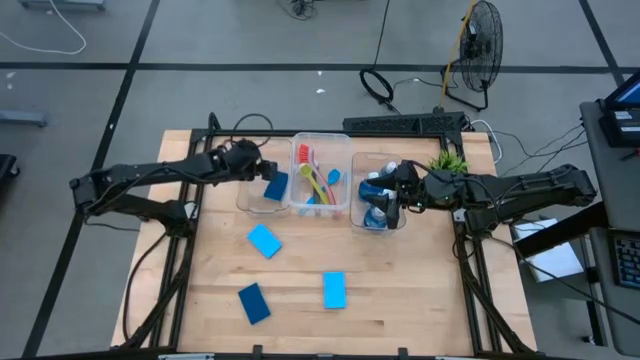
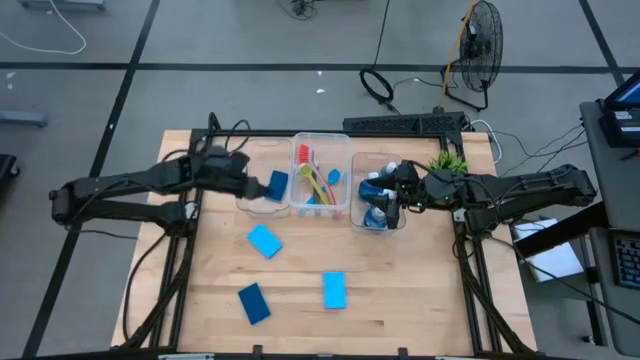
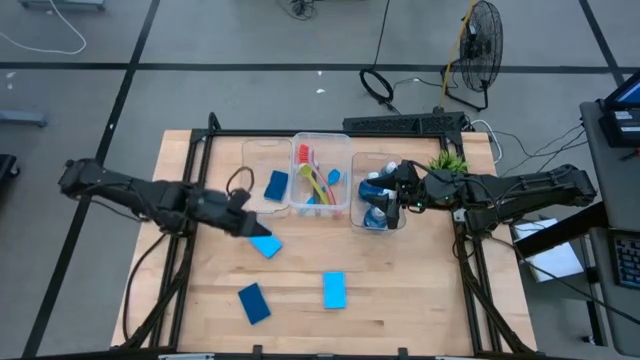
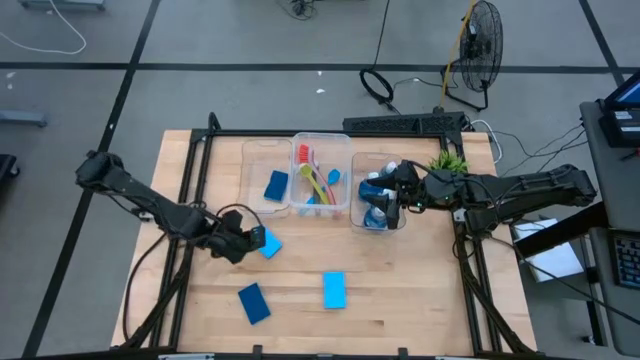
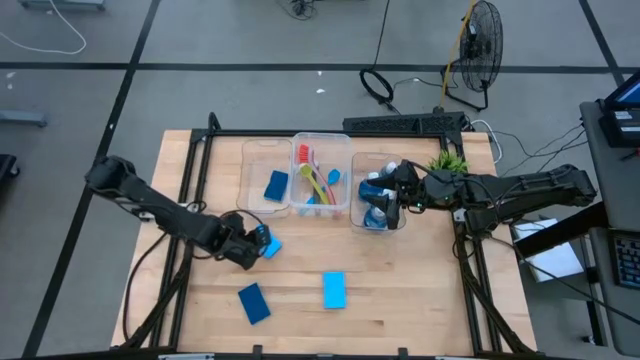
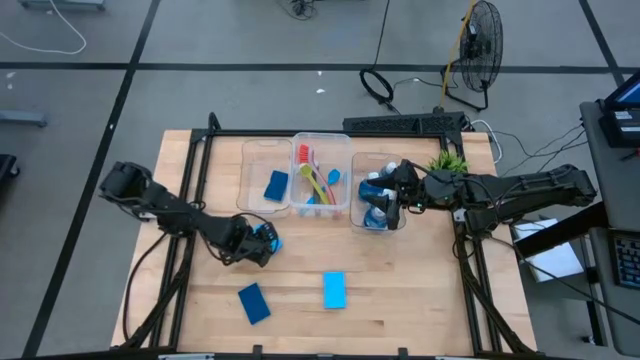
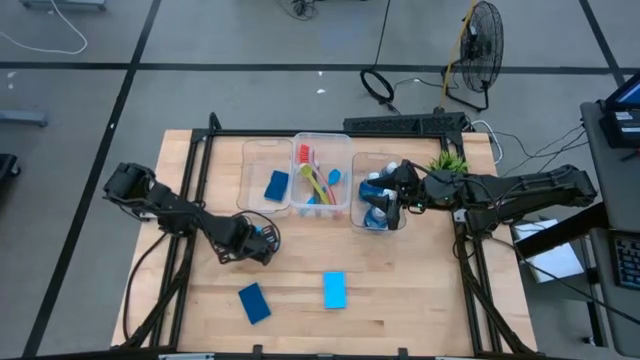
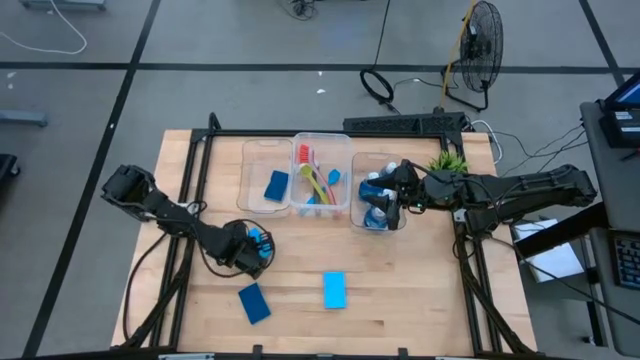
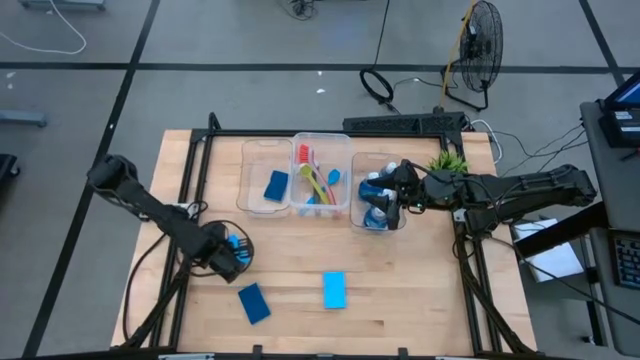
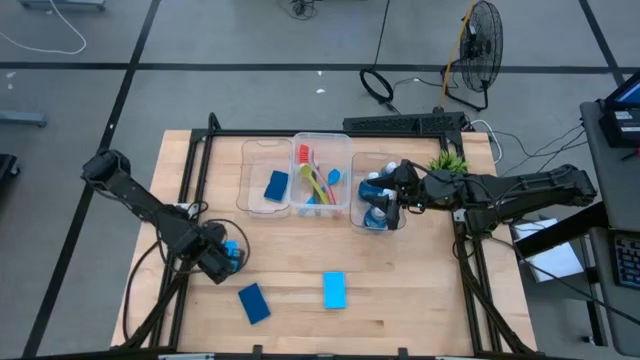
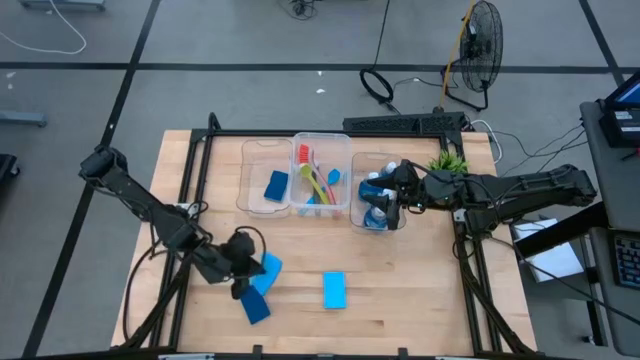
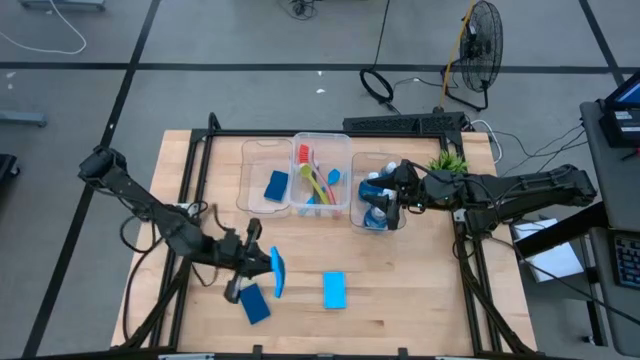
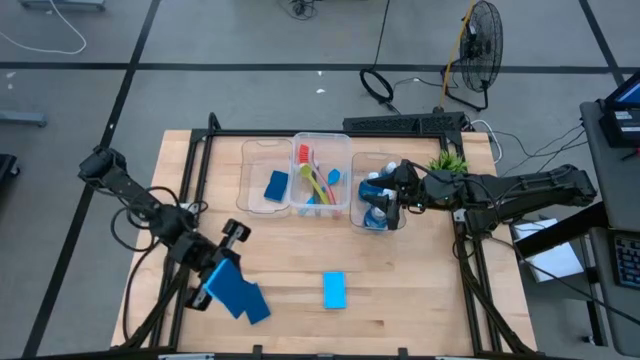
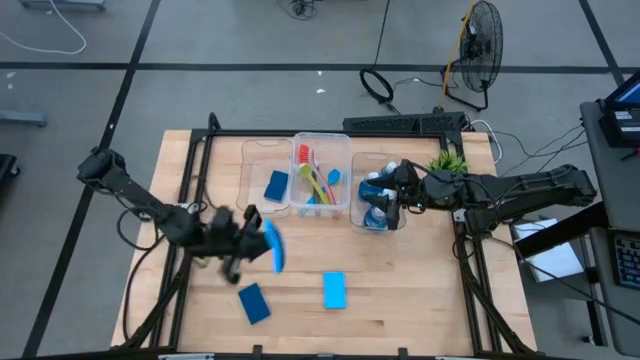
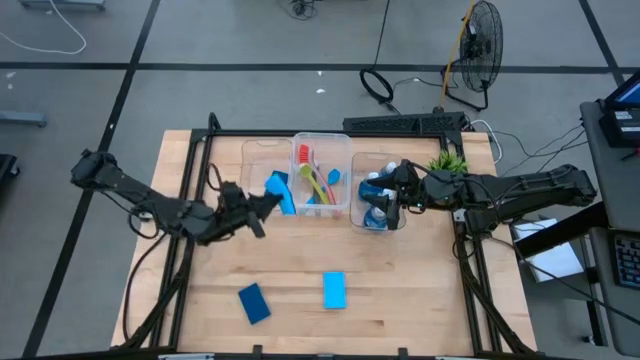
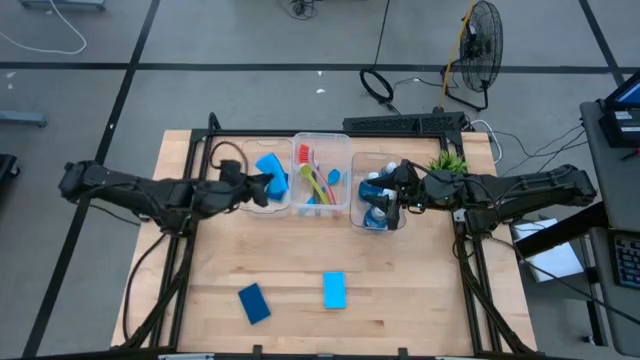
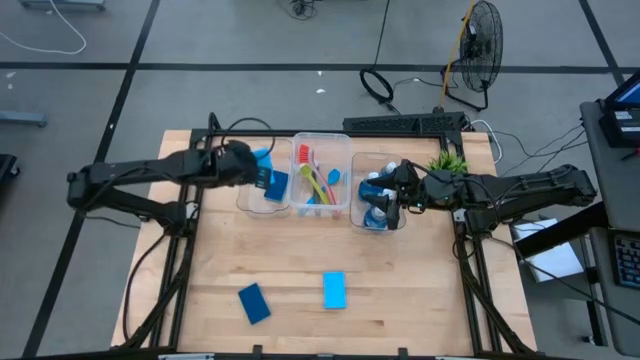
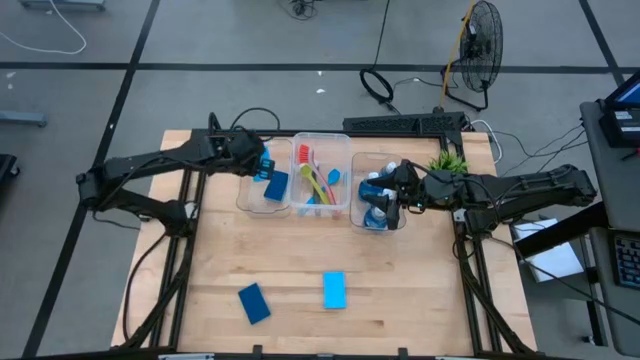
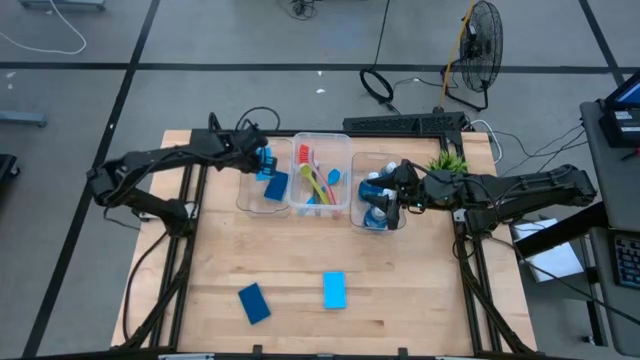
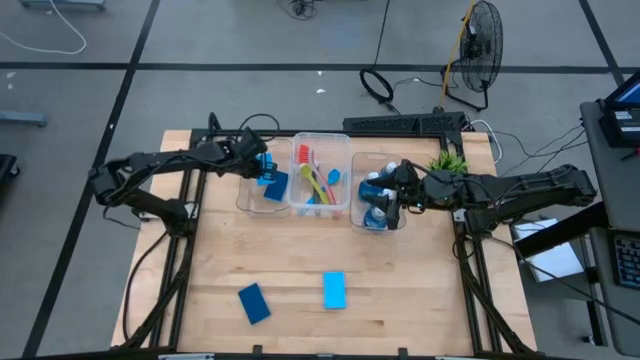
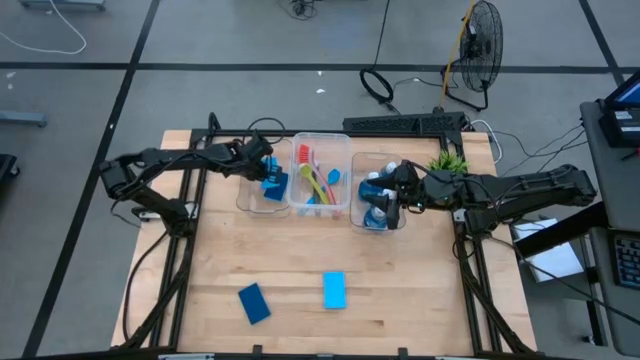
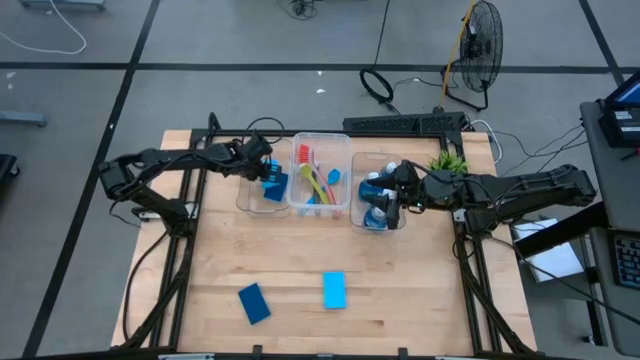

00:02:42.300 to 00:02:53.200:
Task: Pick & Place Kitchen Sink Supplies
Put the light blue sponge into the left transparent bin

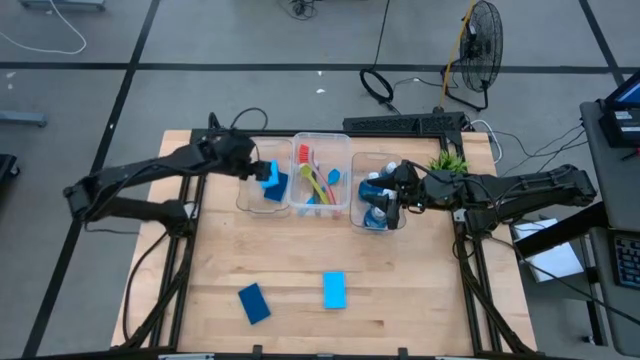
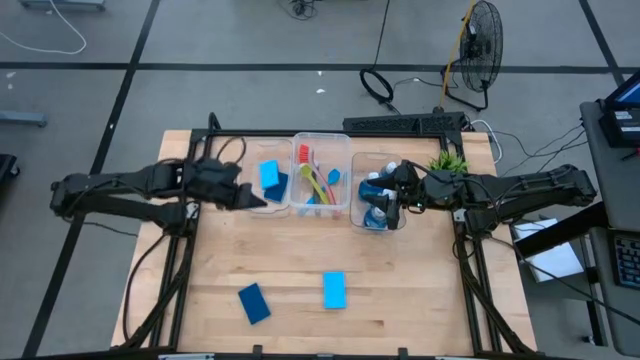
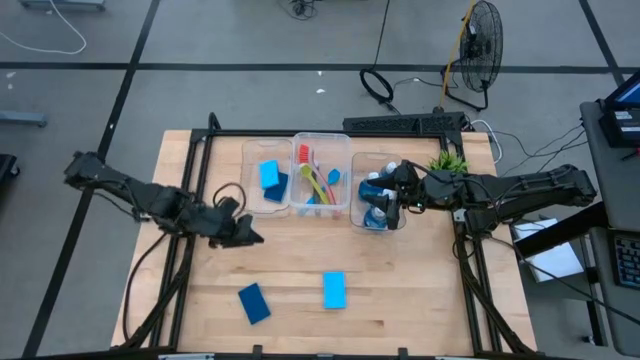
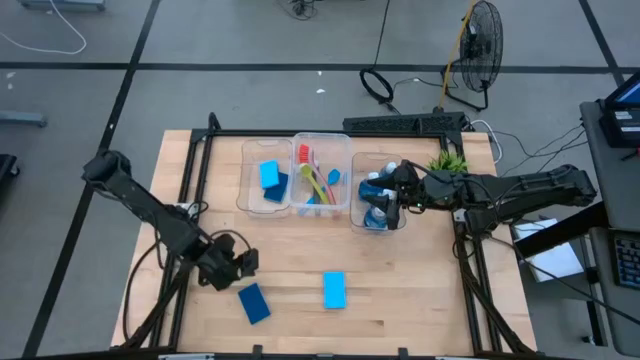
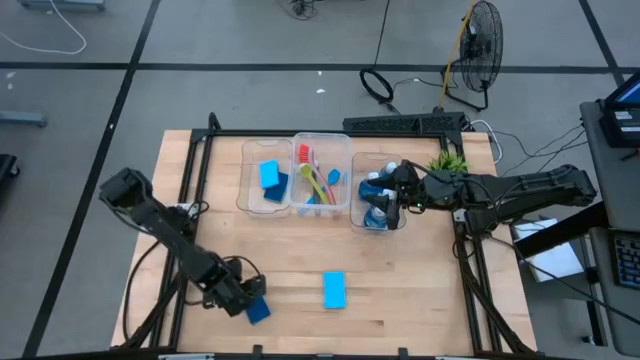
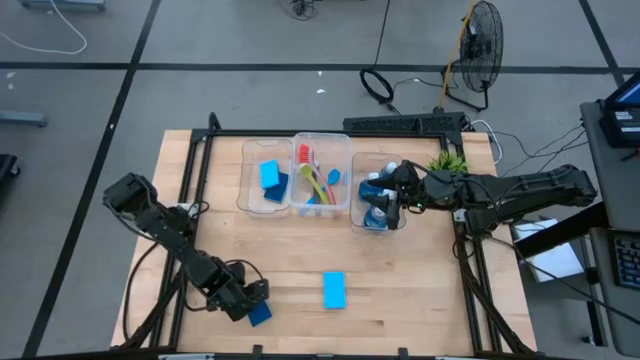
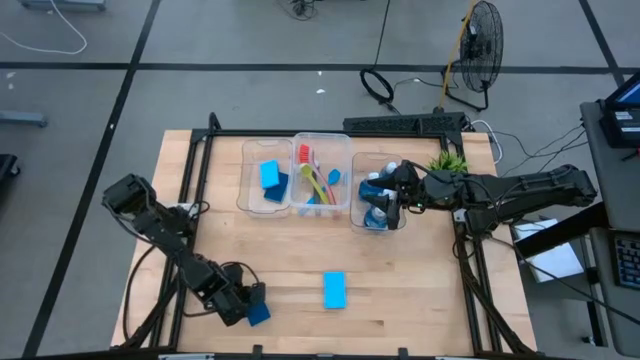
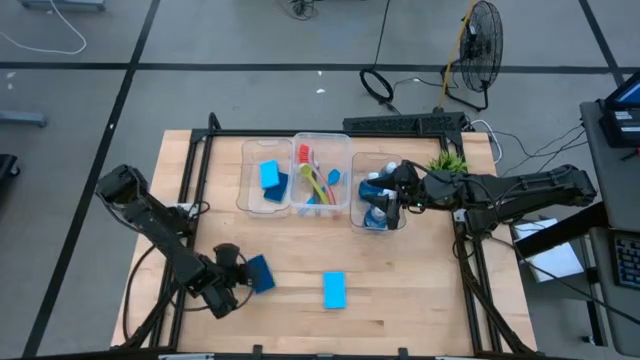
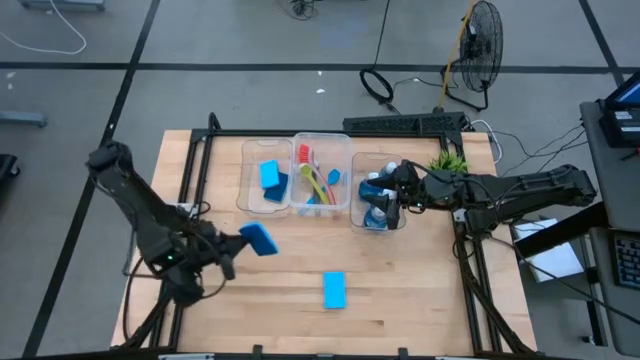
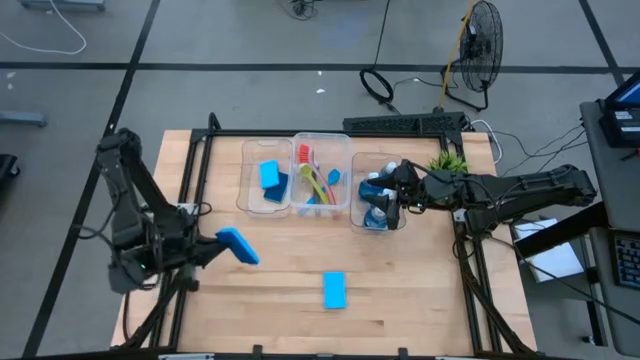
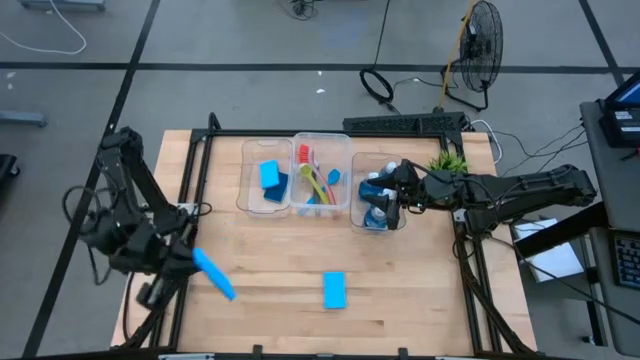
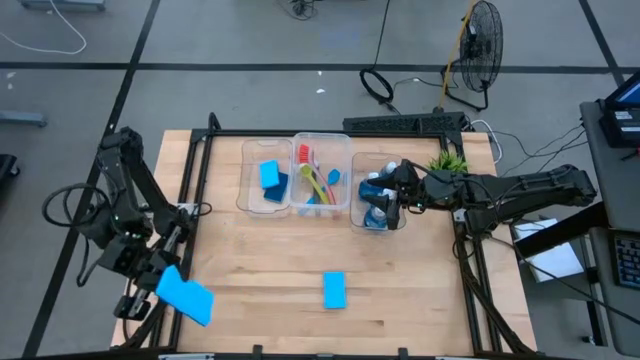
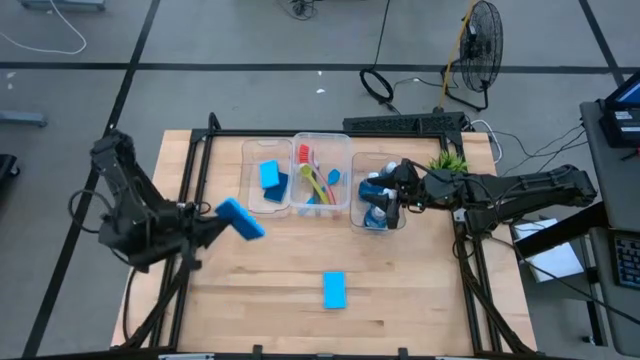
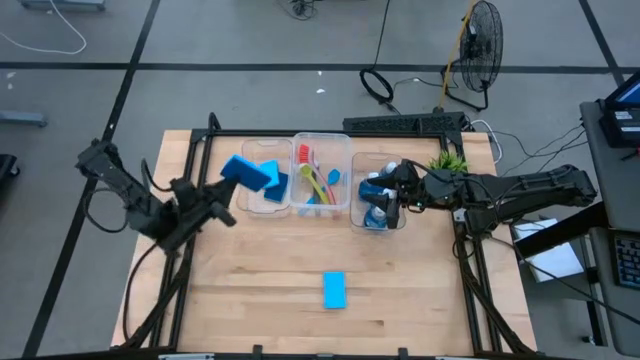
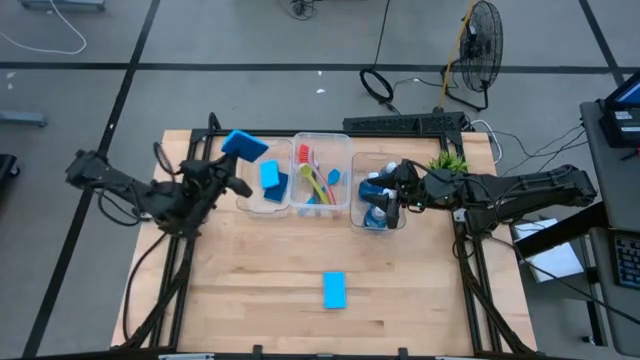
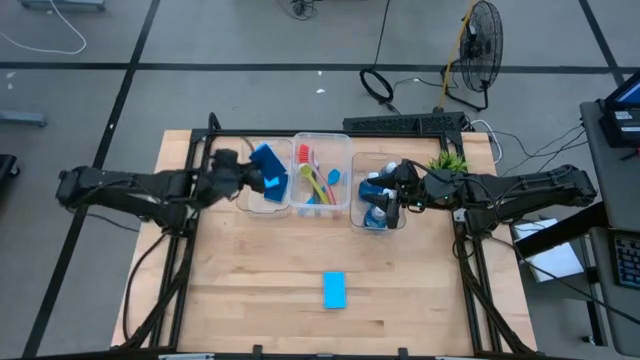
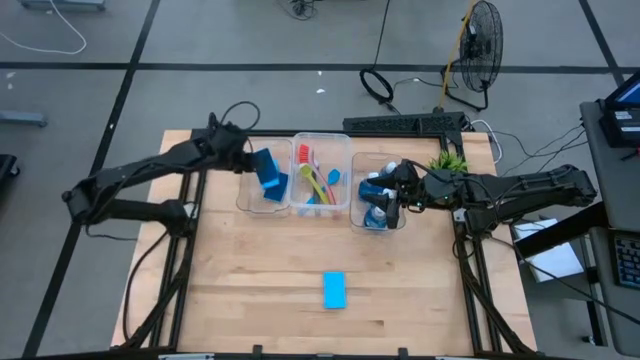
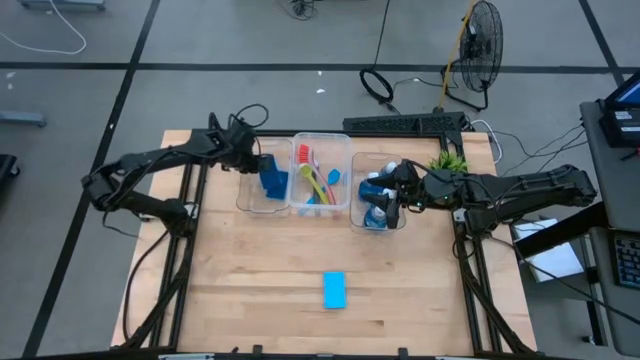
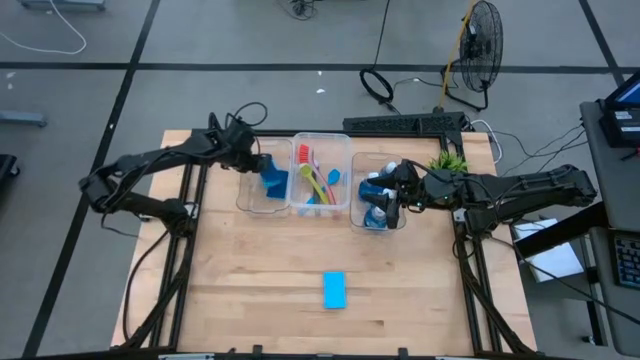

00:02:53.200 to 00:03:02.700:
Put the blue sponge into the left transparent bin

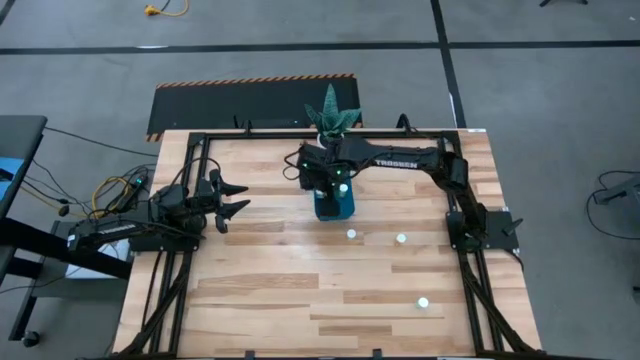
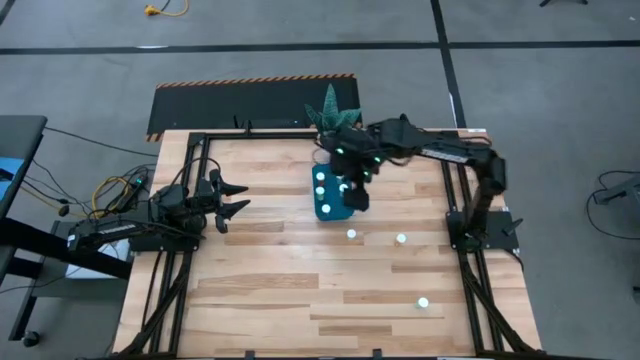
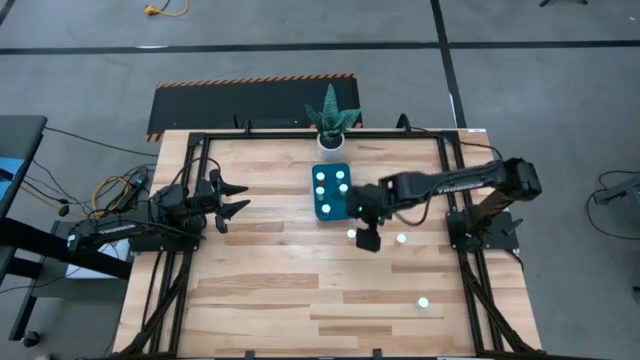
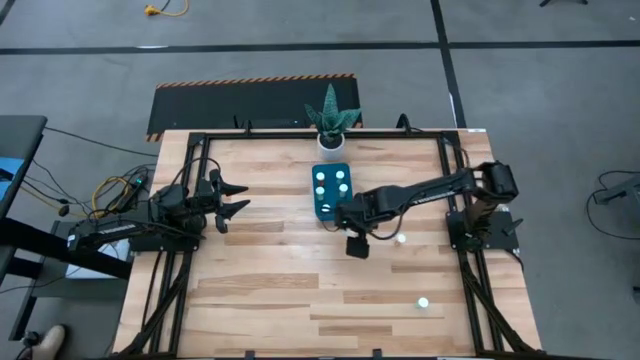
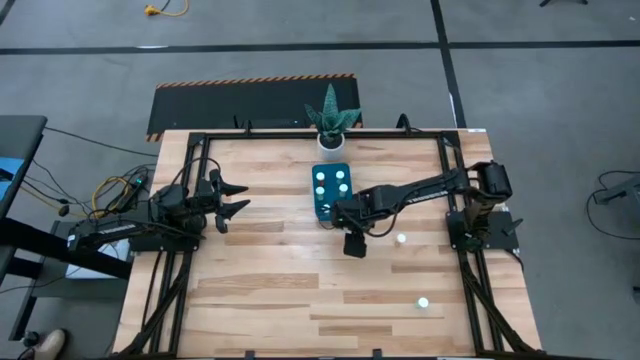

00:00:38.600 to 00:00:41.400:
Task: Pick and place pill bottles into a basket
Put the yellow pill bottle into the blue container
